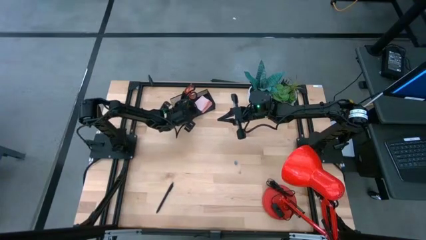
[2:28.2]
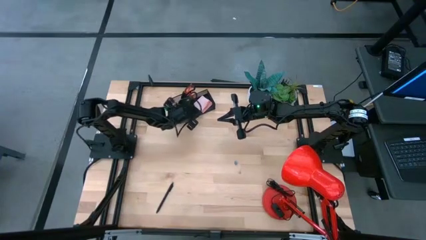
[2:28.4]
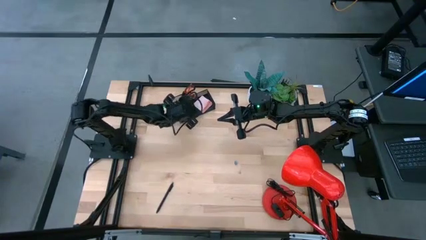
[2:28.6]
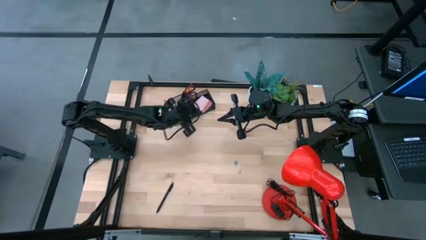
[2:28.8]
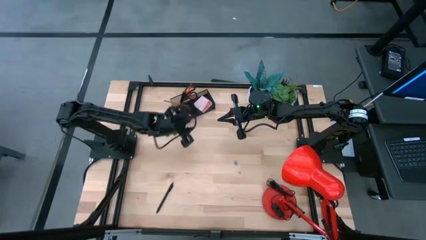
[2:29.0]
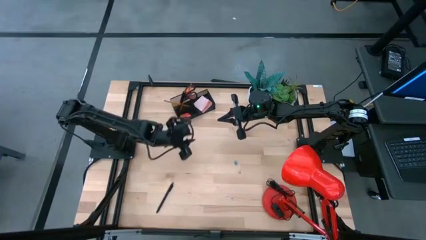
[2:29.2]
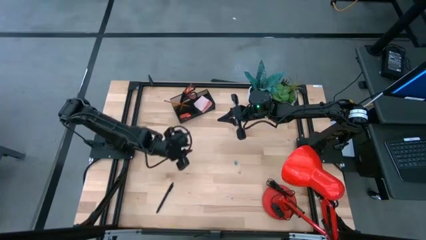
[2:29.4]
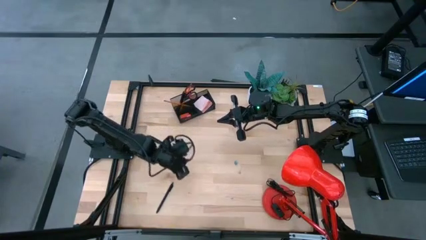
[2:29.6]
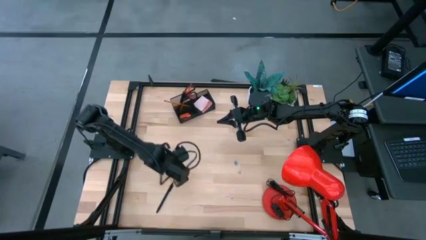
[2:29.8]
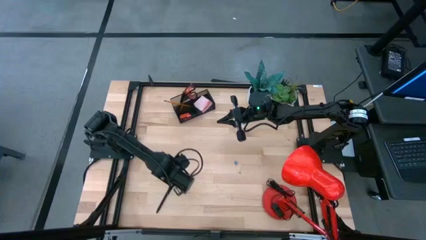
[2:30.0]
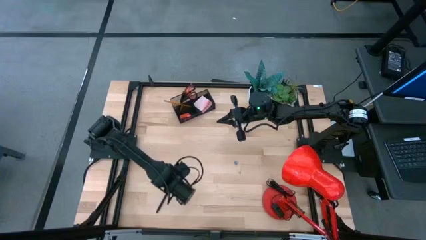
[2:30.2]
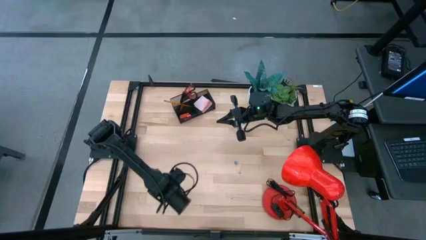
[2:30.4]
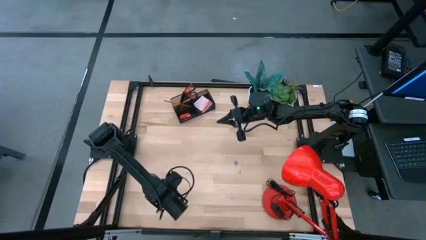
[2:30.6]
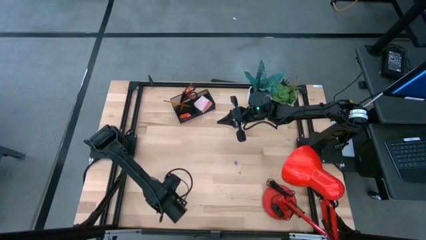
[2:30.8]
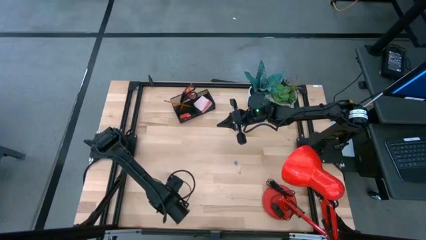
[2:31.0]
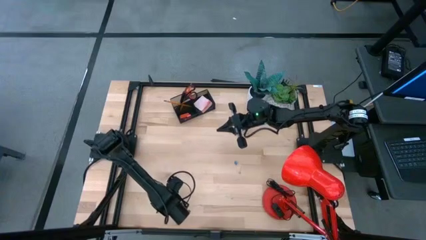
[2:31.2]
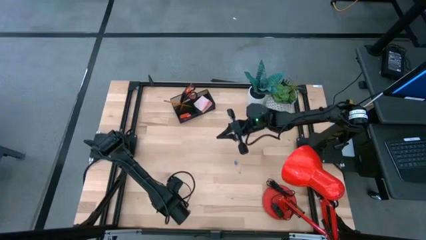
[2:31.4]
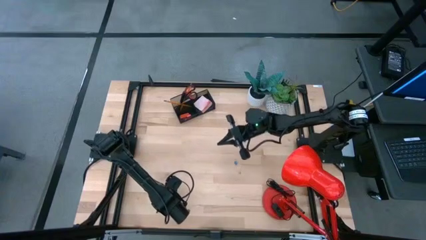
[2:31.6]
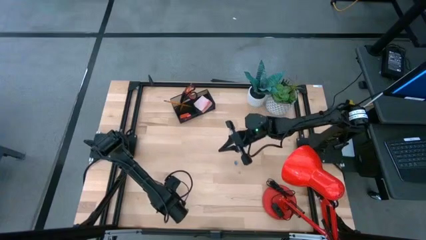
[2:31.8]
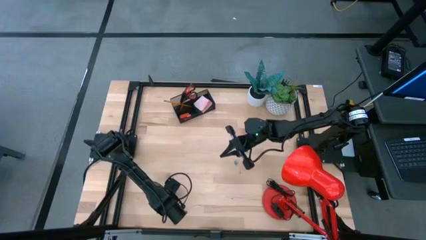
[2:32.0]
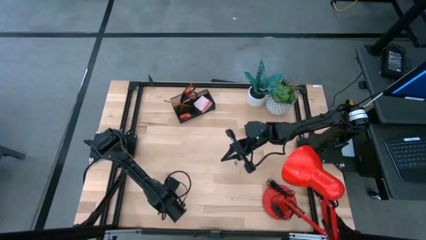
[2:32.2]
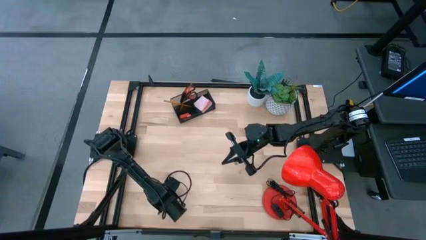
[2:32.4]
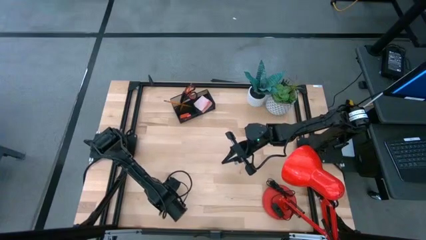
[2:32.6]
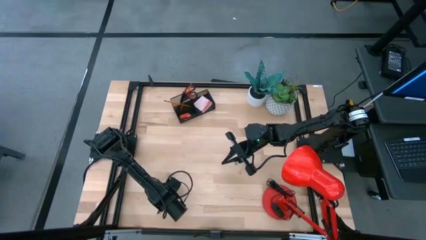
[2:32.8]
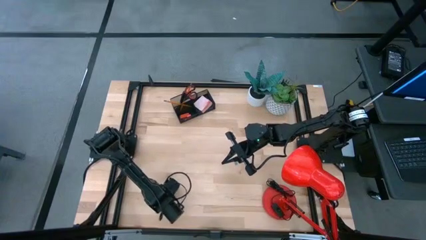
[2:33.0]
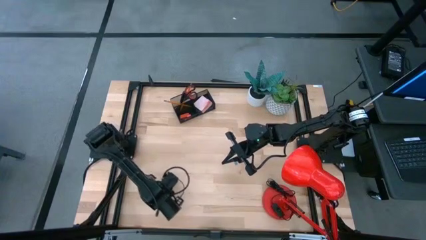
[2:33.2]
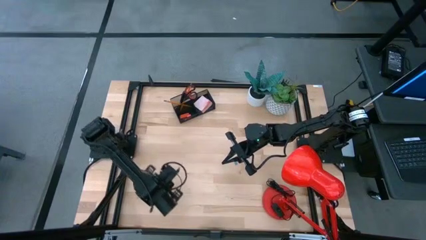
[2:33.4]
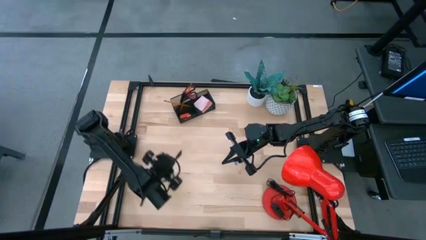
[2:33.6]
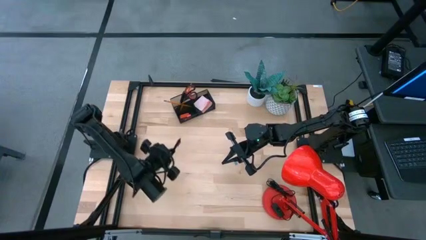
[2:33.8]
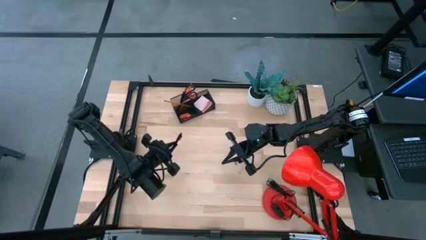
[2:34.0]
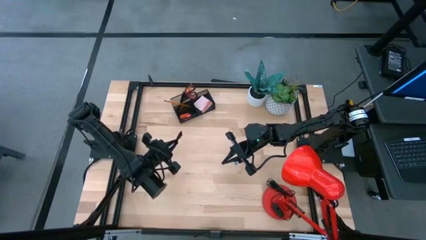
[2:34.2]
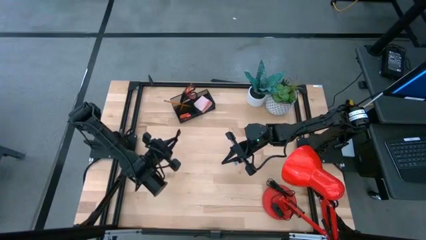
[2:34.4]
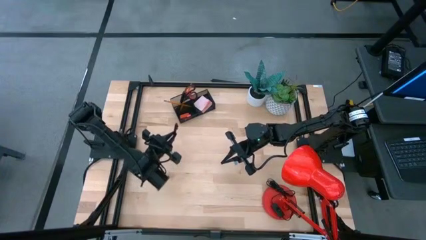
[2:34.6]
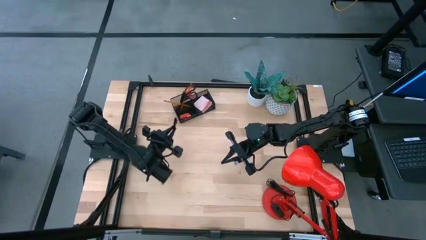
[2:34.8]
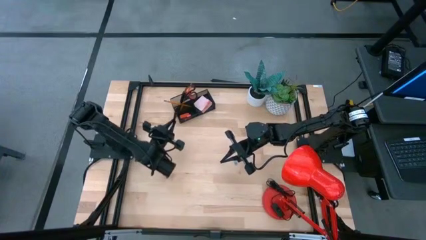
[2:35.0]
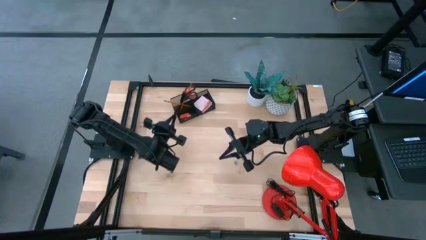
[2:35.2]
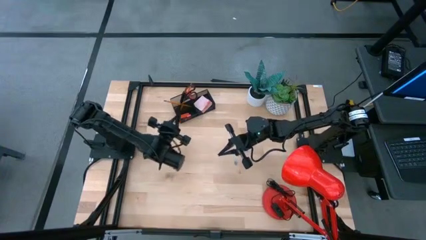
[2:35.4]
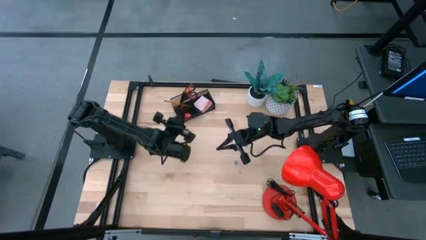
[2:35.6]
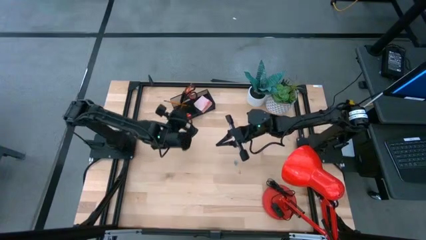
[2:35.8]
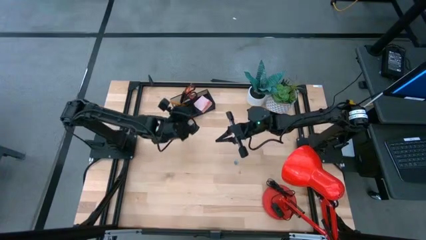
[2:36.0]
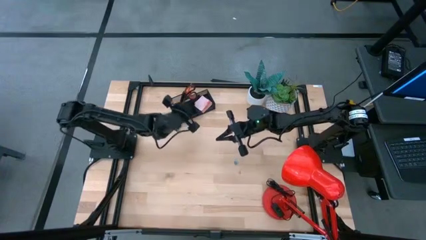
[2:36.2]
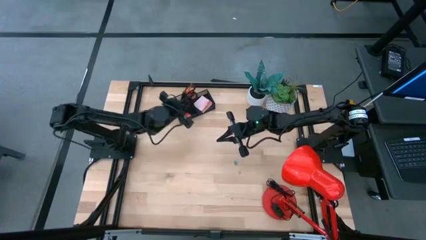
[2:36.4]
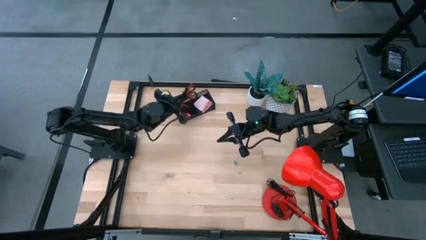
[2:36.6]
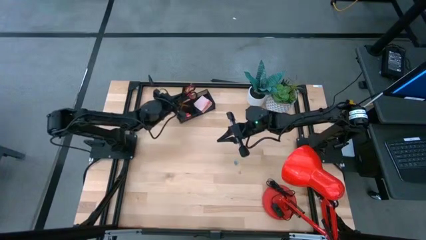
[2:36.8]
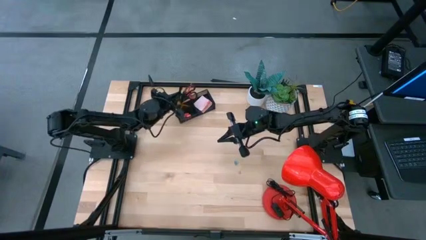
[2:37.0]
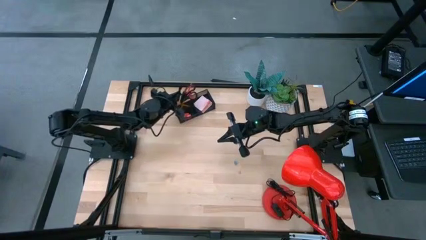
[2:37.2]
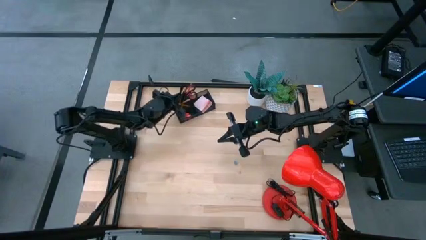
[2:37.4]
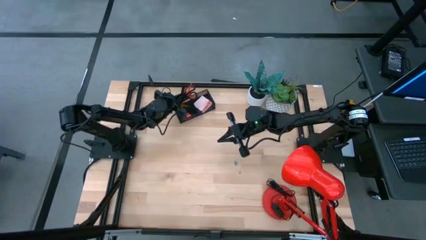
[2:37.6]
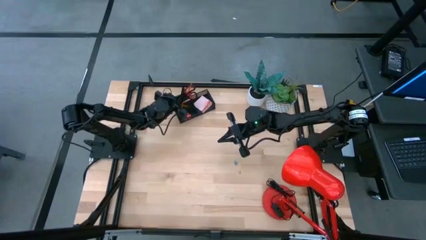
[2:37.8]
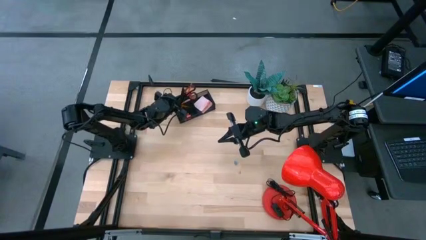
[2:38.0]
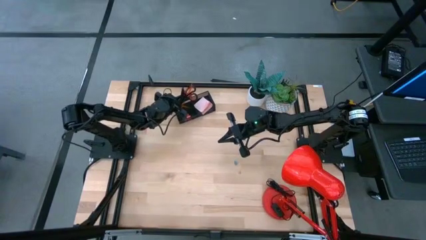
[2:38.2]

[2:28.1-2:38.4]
Task: Pick and place office supplies into organizer
Put the pen into the desk organizer
